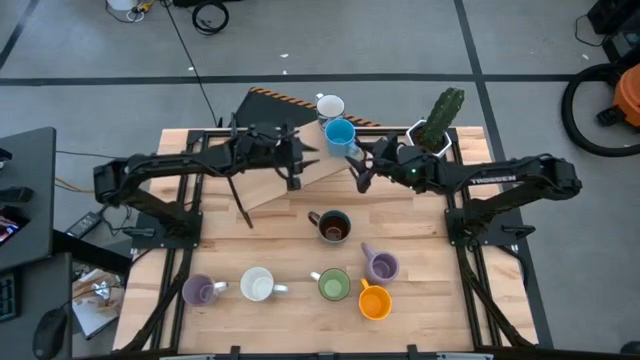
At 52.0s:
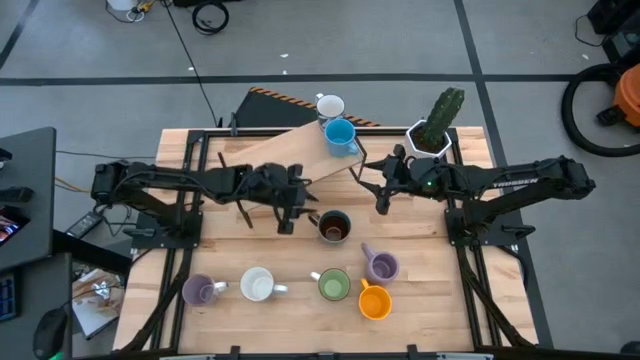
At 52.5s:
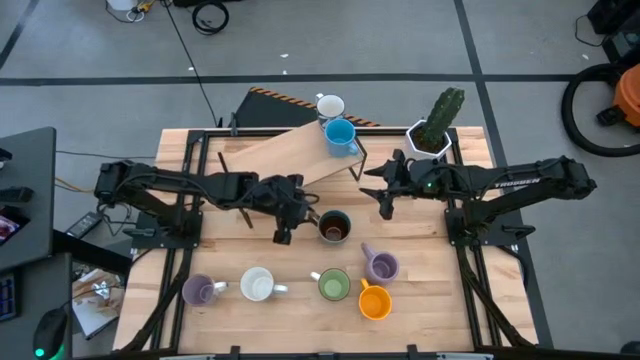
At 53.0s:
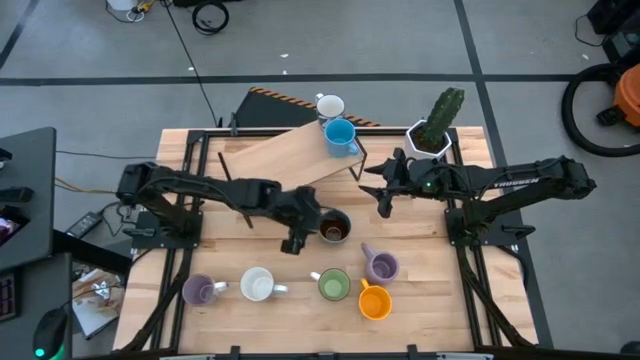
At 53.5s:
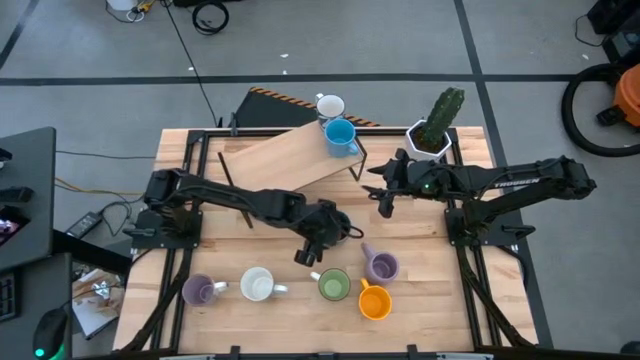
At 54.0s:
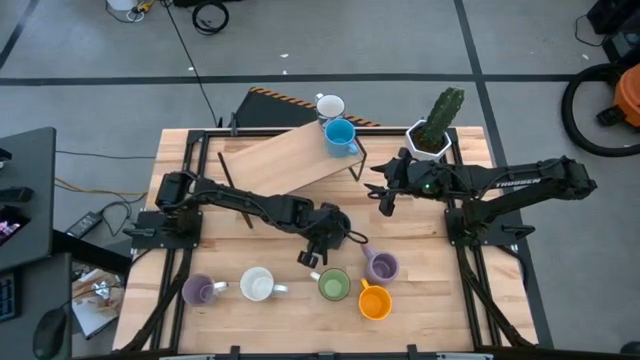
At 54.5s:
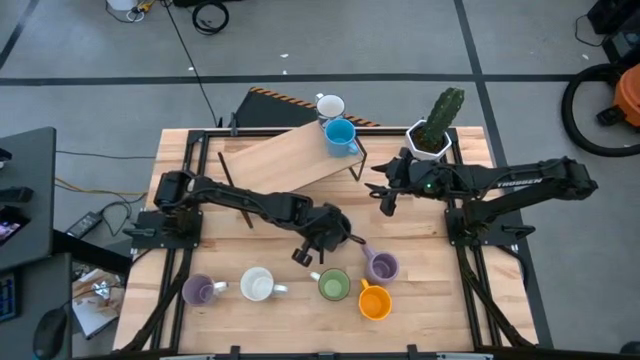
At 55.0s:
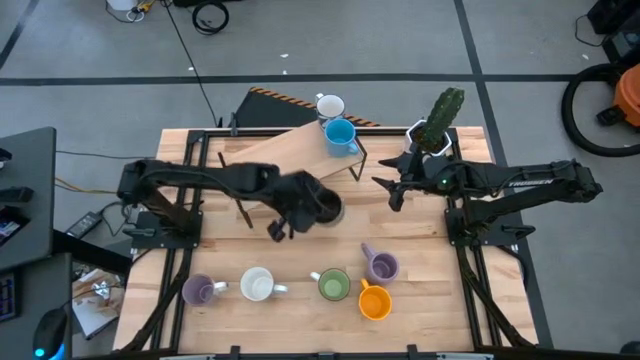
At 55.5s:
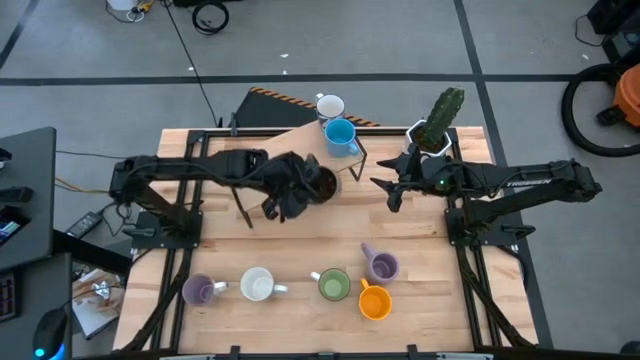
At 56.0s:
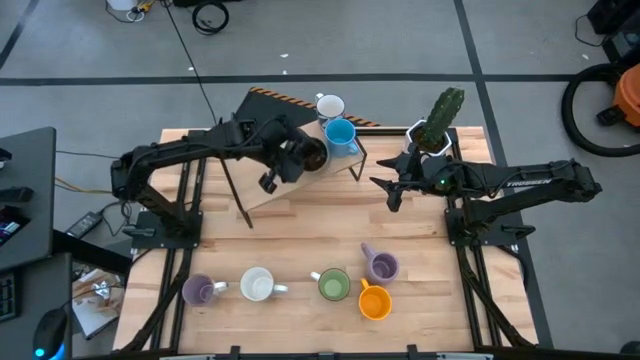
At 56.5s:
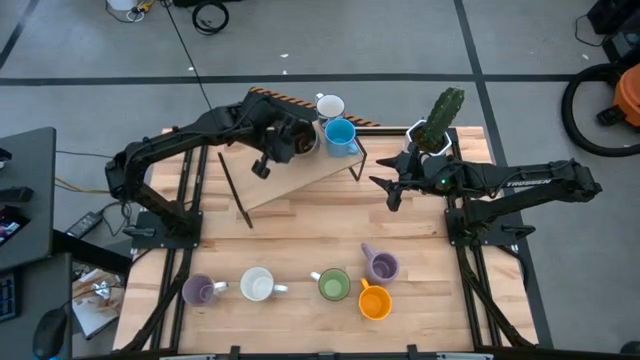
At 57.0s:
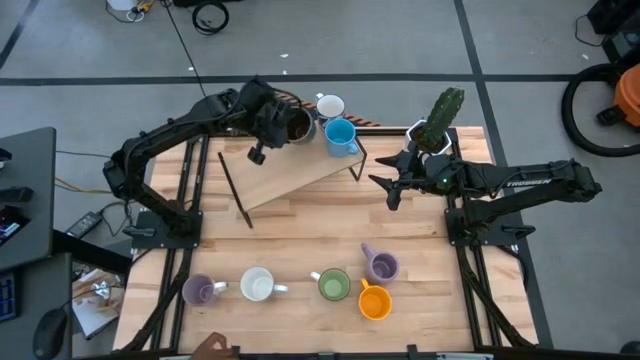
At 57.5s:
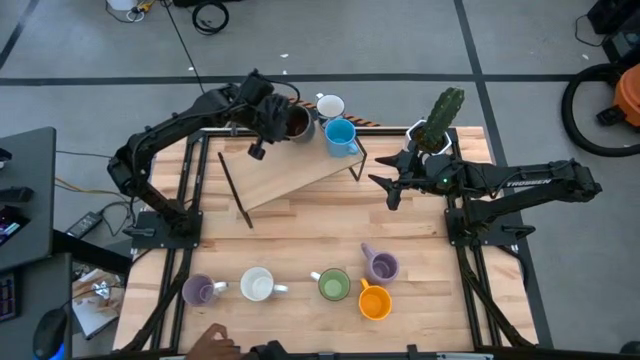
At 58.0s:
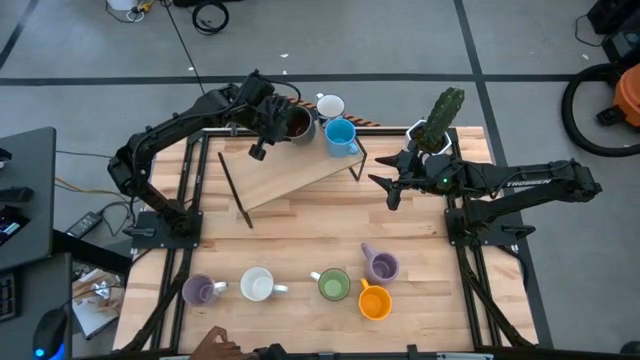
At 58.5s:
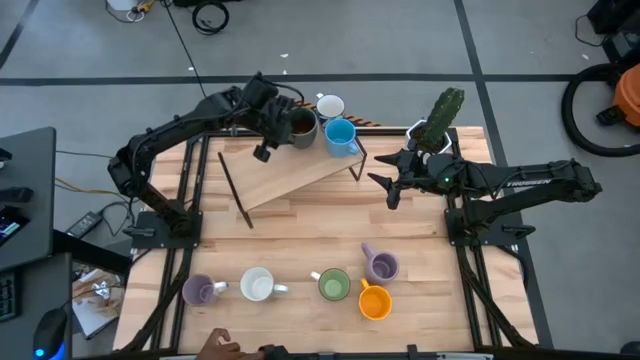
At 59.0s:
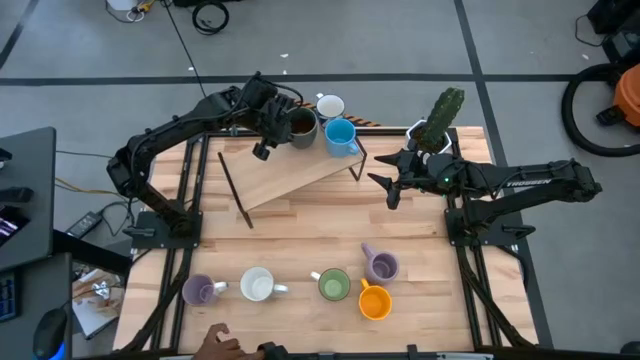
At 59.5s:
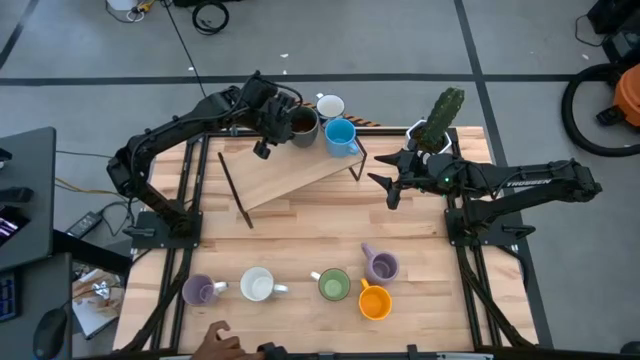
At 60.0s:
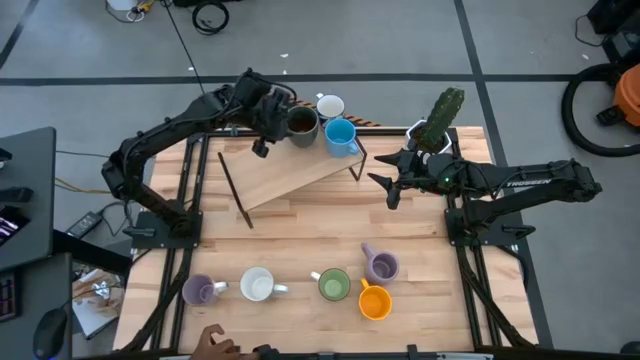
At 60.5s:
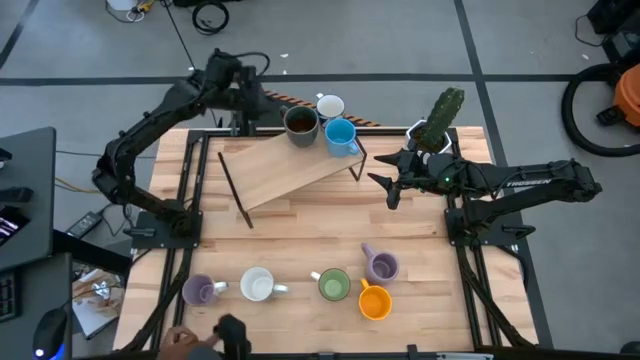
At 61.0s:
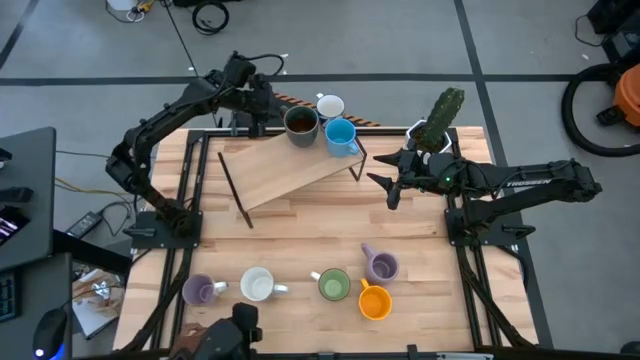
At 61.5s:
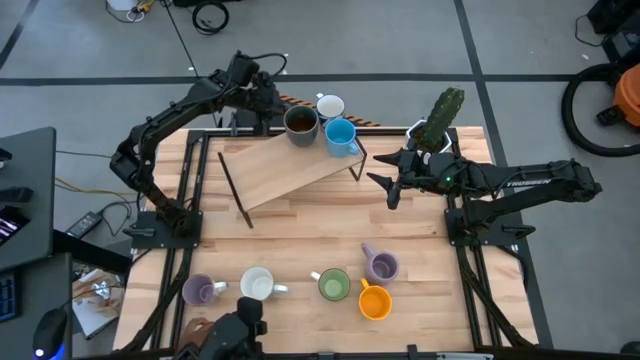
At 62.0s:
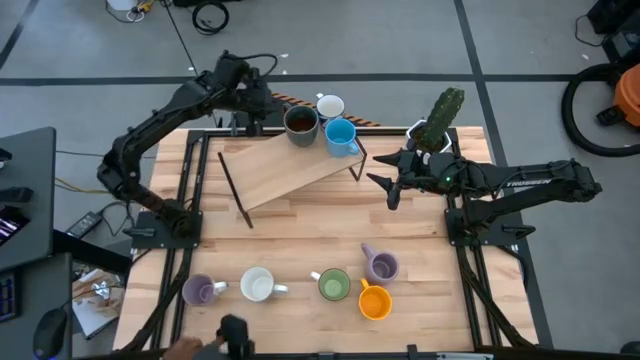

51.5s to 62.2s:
Task: Place coffee mugs
Put the pattern blue mug on the shelf

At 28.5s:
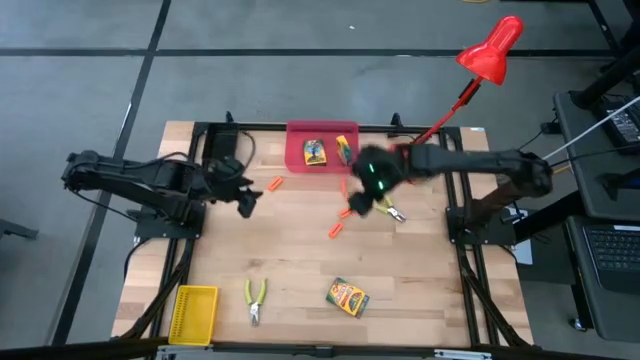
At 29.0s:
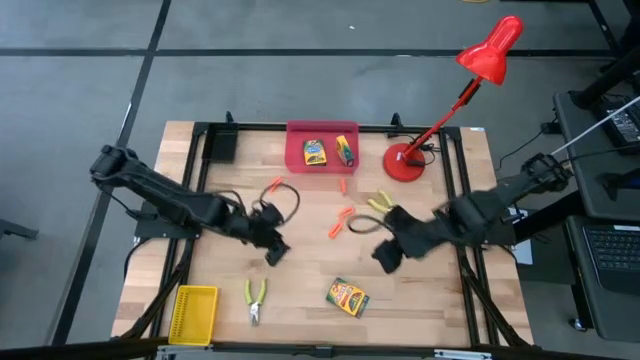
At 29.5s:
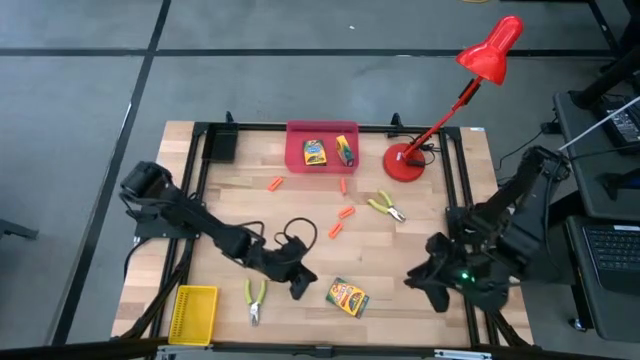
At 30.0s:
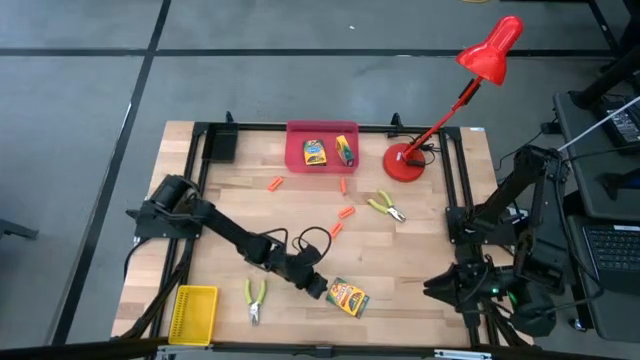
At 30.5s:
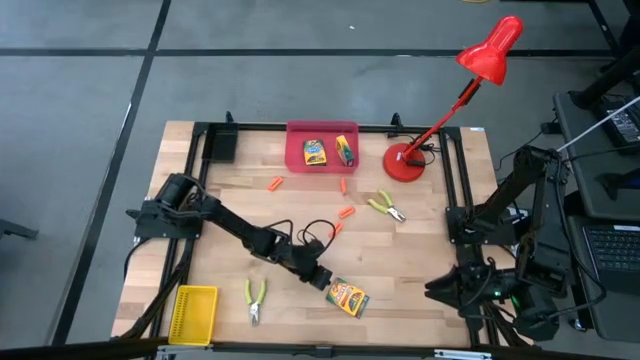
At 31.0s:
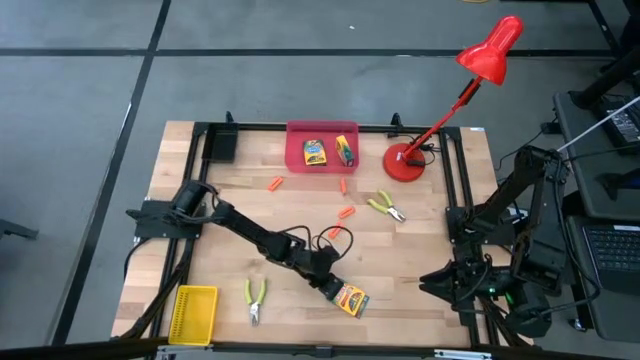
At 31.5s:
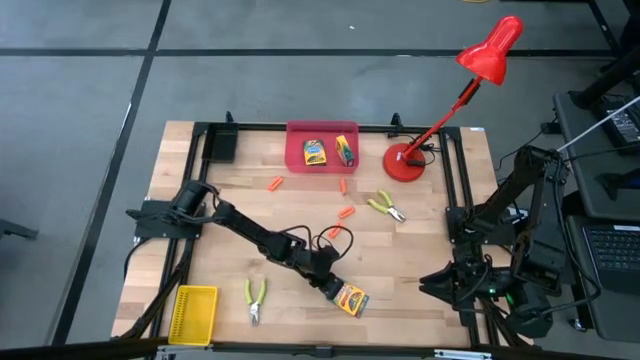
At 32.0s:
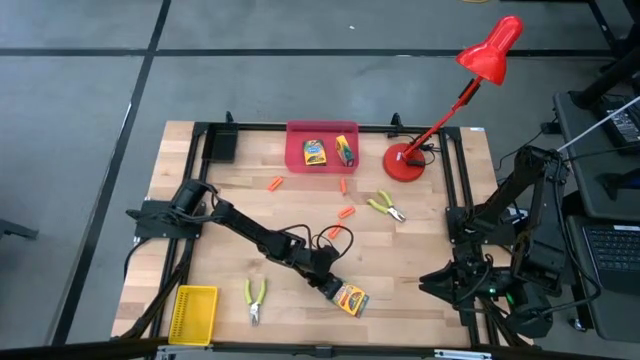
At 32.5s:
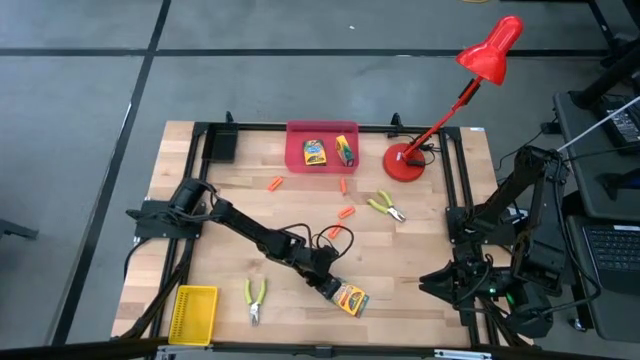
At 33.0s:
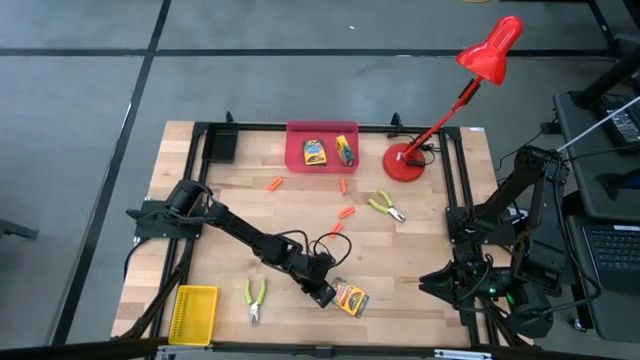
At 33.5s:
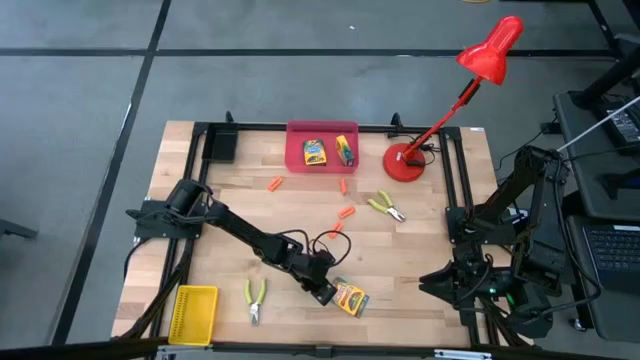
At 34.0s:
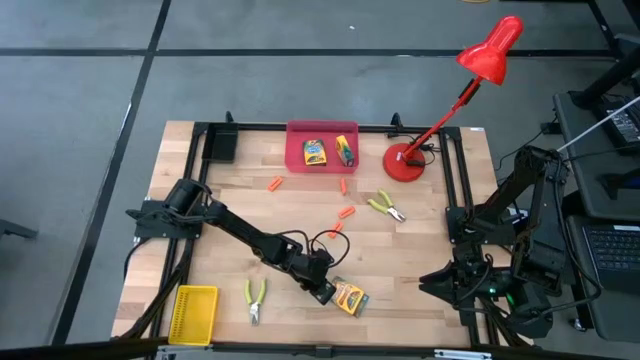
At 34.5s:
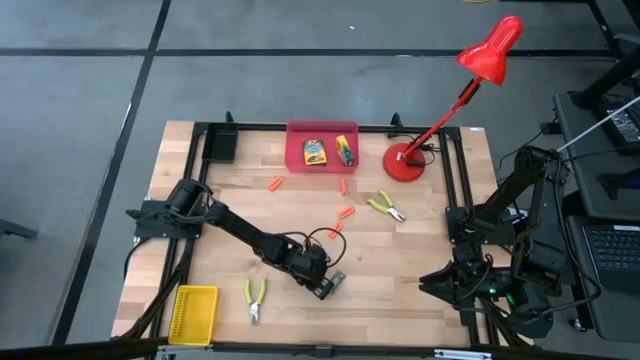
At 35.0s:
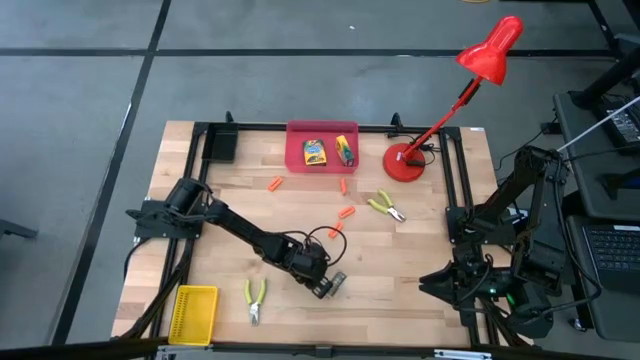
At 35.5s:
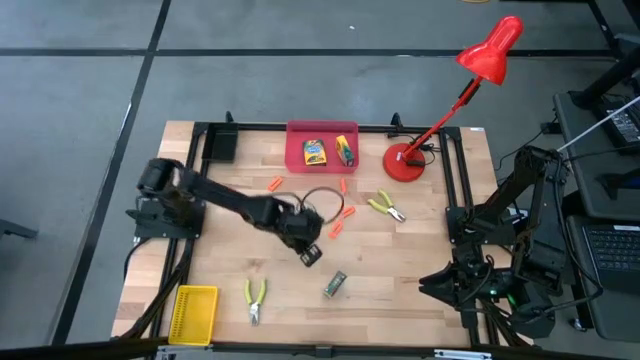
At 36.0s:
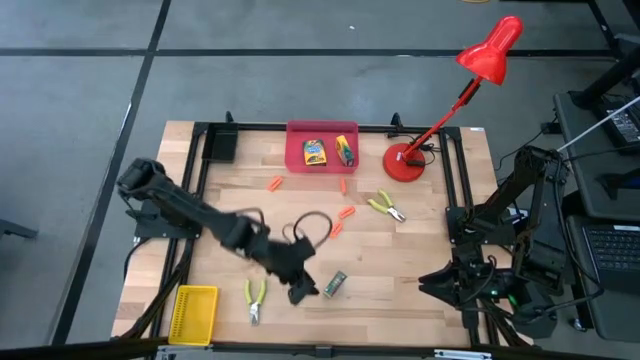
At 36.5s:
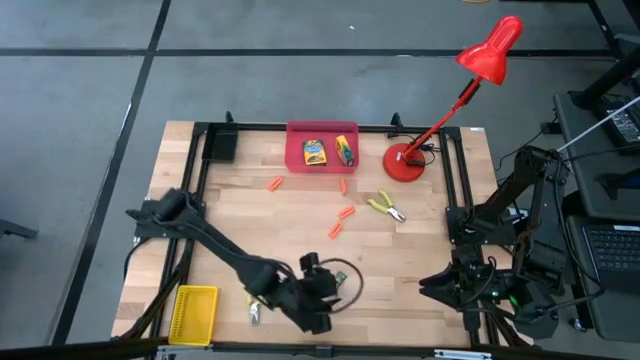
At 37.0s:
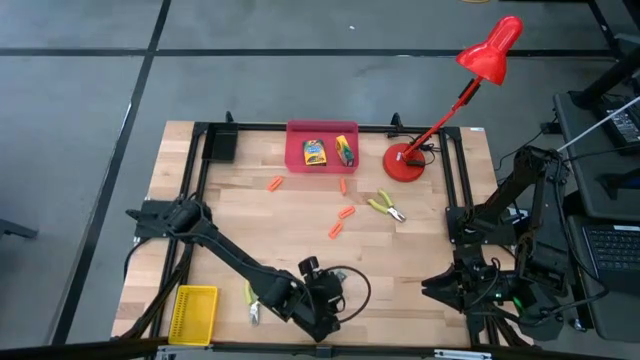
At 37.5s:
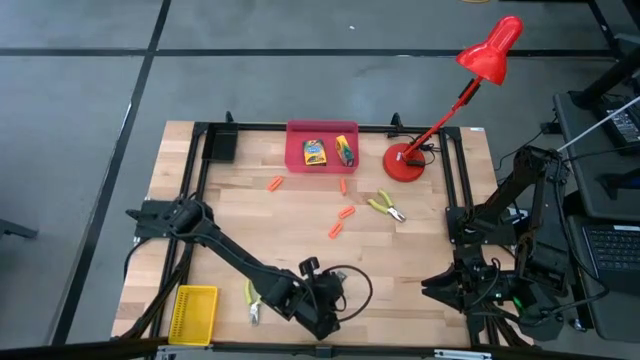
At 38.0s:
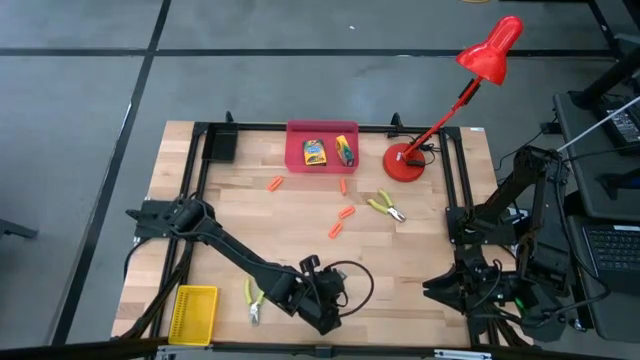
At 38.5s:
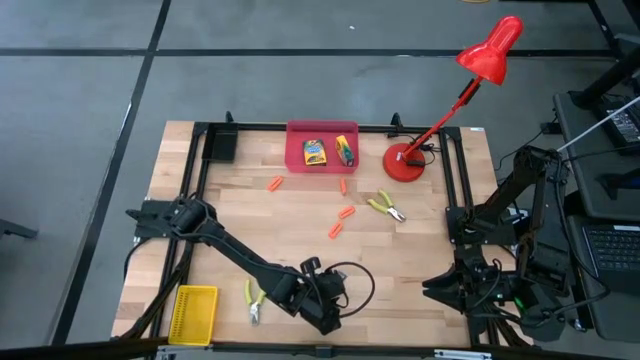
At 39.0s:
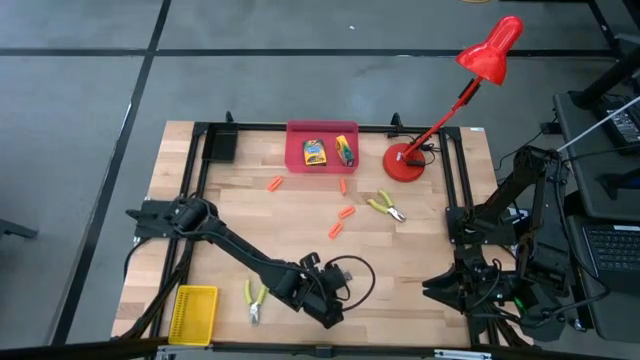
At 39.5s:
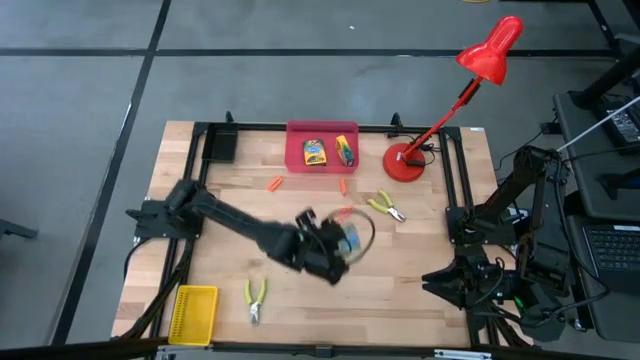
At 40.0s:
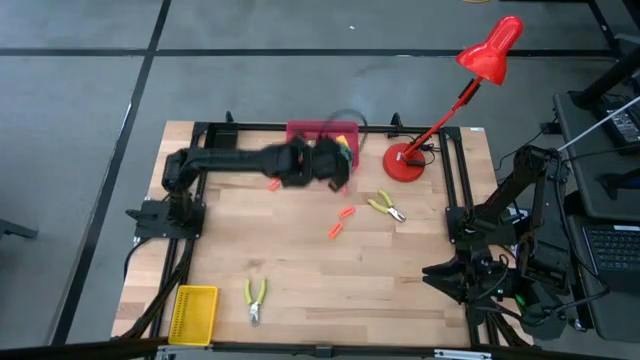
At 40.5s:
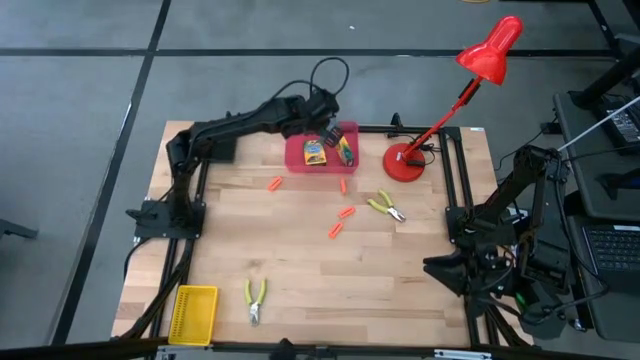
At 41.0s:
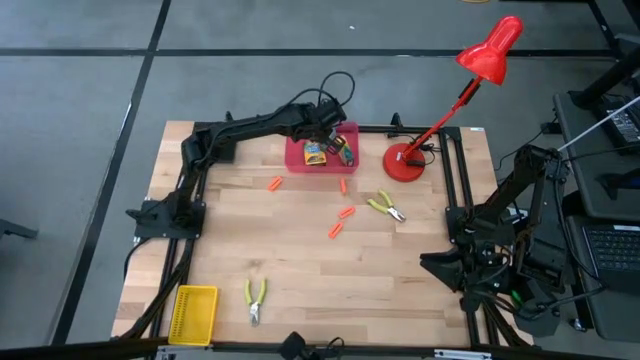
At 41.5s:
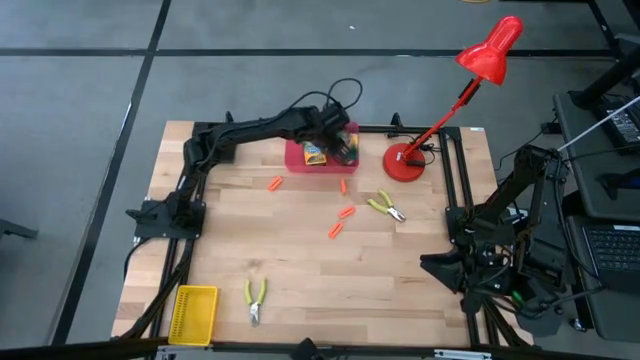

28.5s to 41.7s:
Task: Pick & Place School Supplies
Put the yellow crayon box into the red bin
